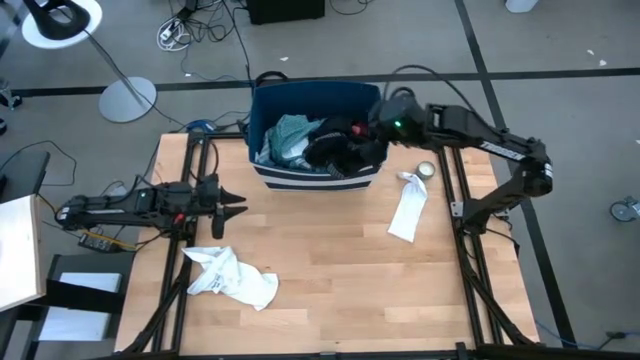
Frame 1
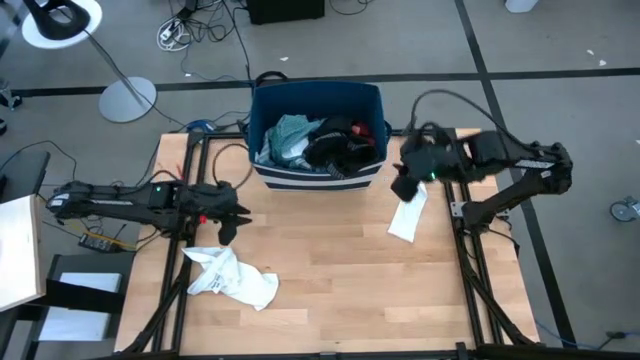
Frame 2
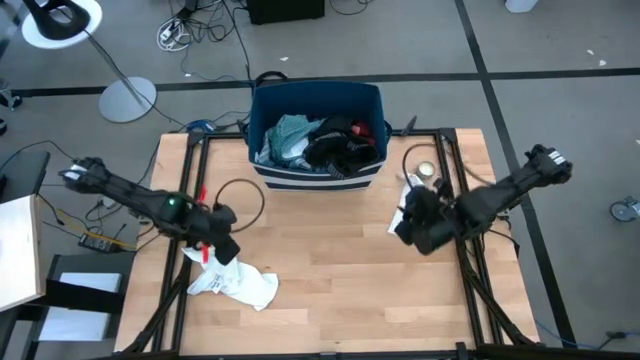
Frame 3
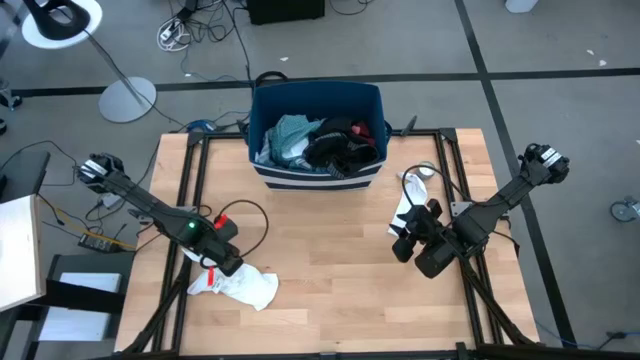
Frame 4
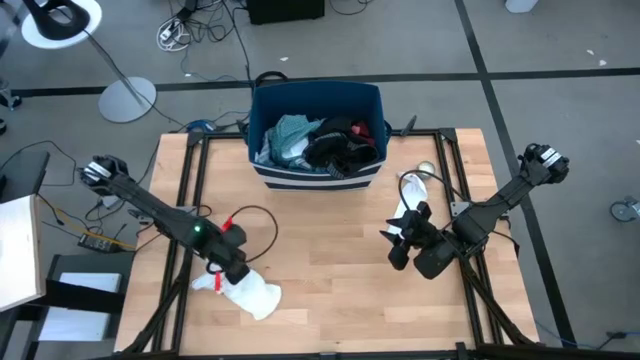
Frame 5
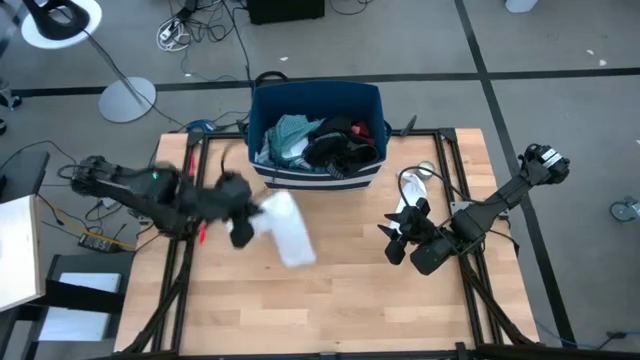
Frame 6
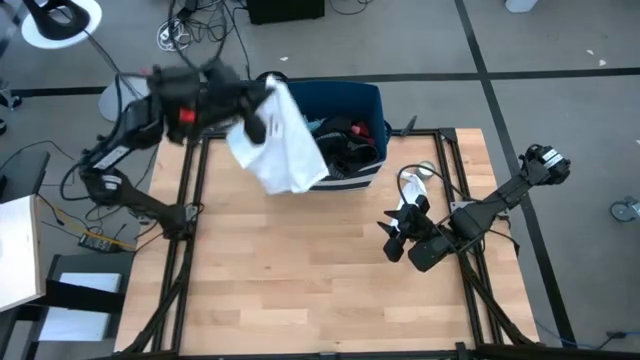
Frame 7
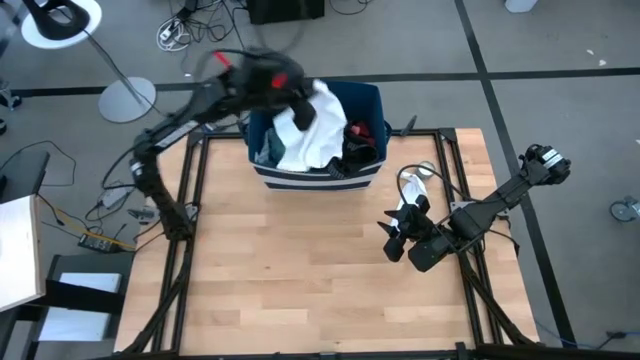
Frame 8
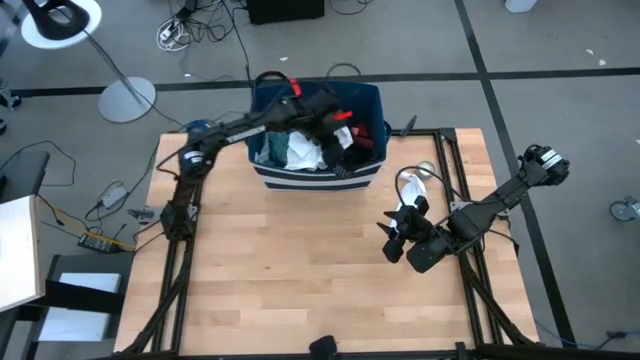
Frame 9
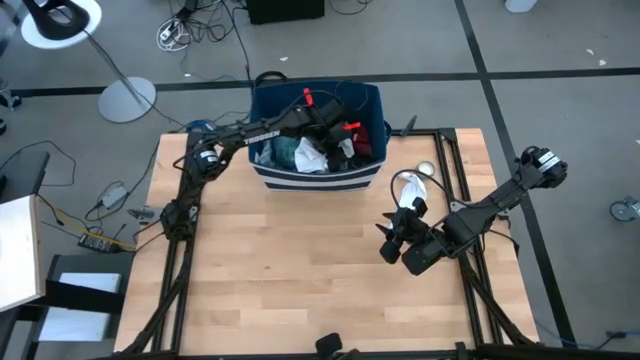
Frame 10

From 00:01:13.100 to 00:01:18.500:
Task: Sort clothes
Put the white shorts into the blue laundry bin

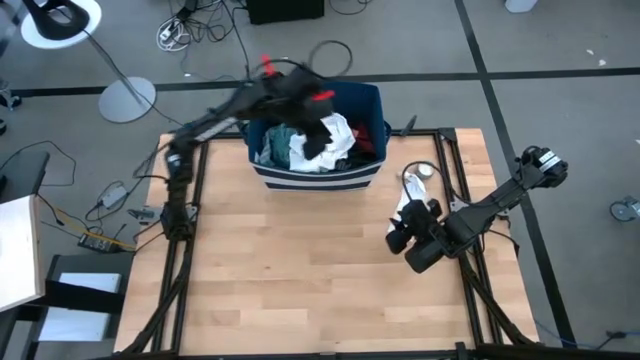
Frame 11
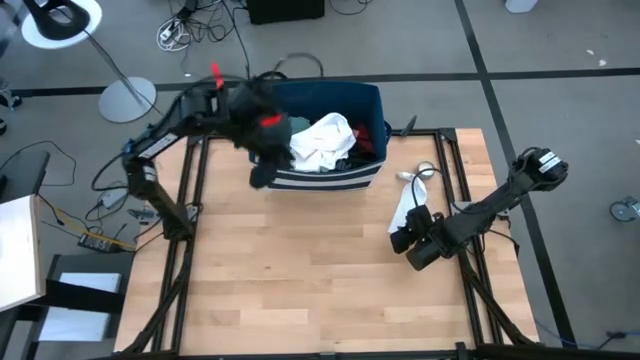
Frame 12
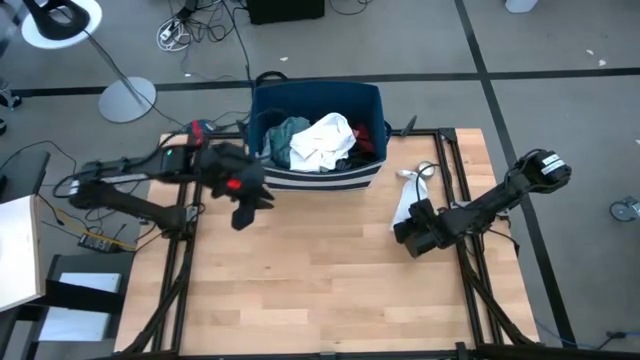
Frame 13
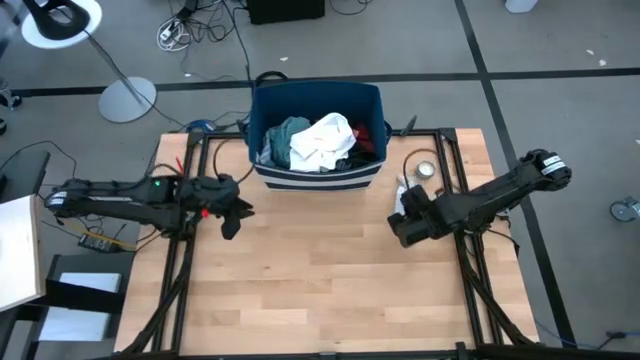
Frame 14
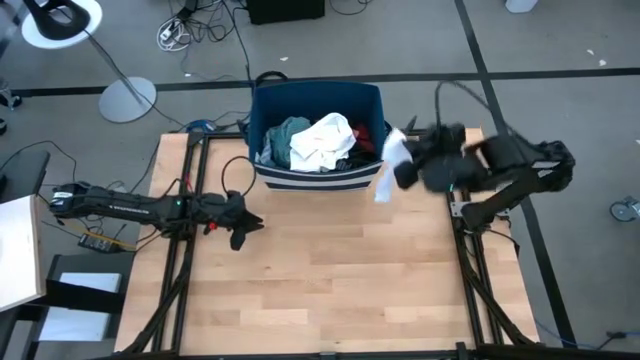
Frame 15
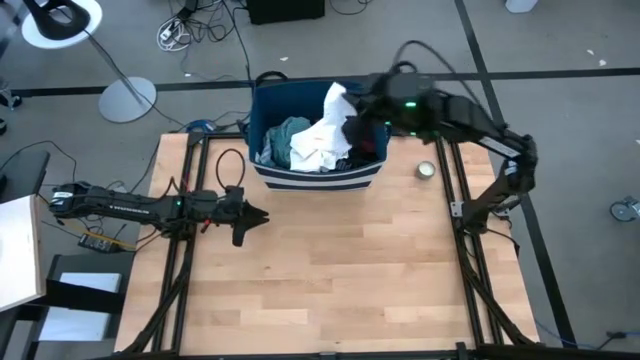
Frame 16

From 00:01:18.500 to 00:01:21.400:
Put the white sock into the blue laundry bin

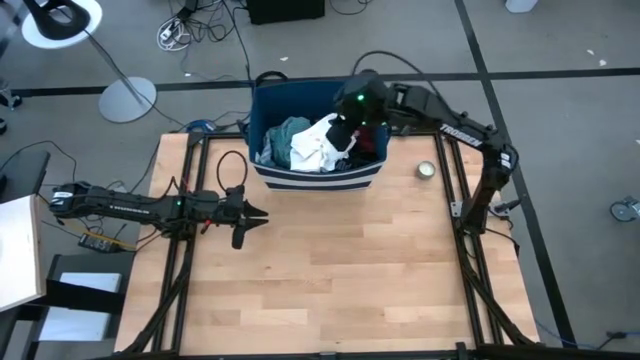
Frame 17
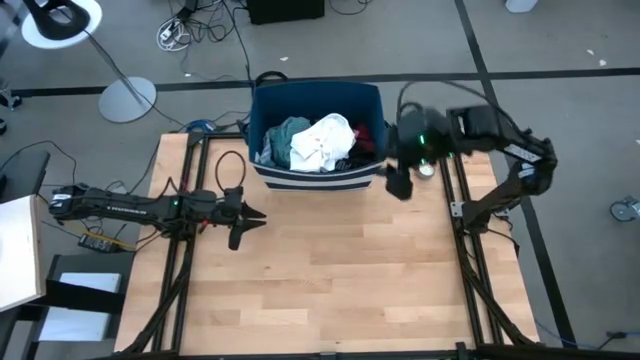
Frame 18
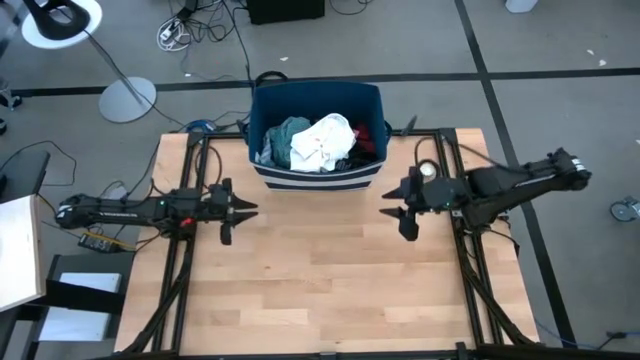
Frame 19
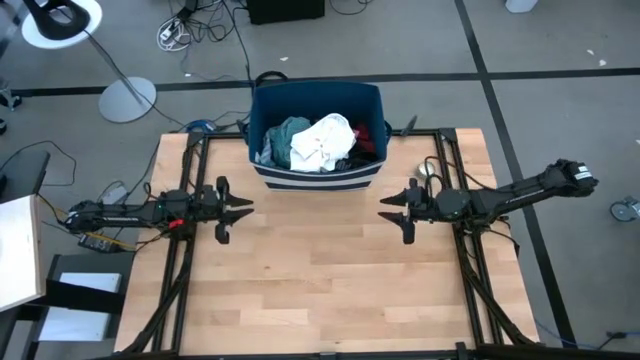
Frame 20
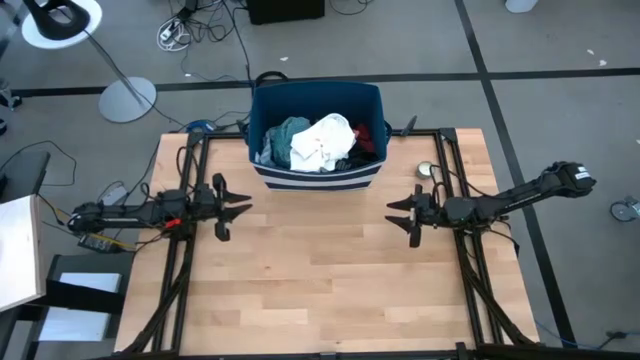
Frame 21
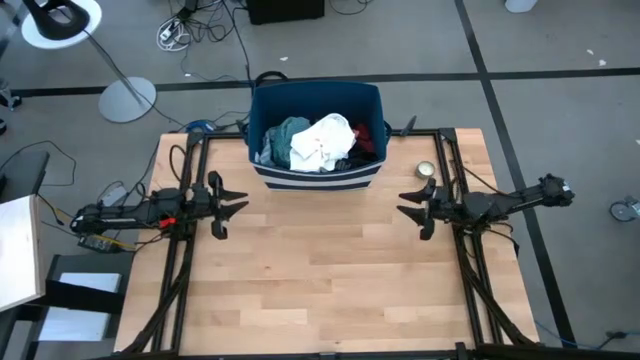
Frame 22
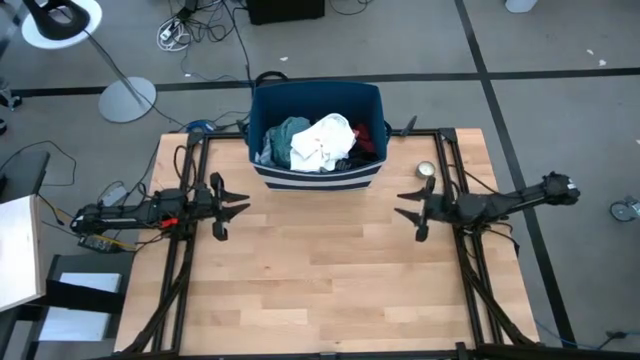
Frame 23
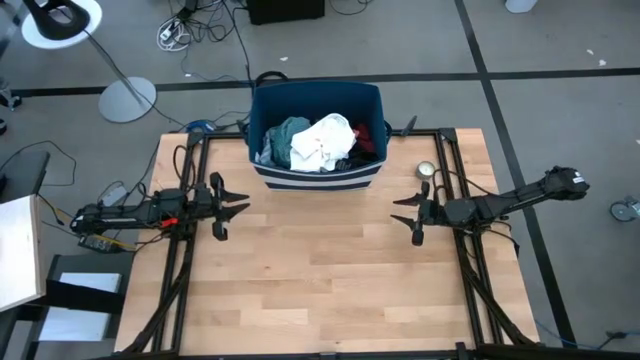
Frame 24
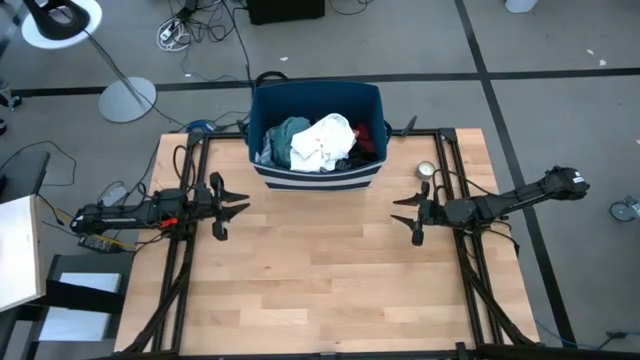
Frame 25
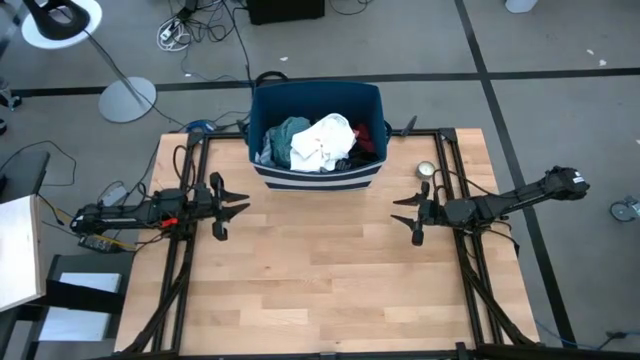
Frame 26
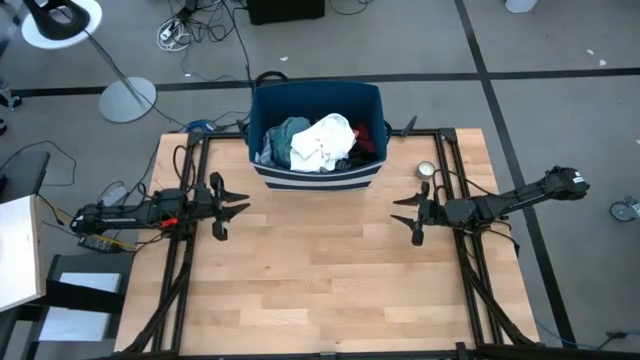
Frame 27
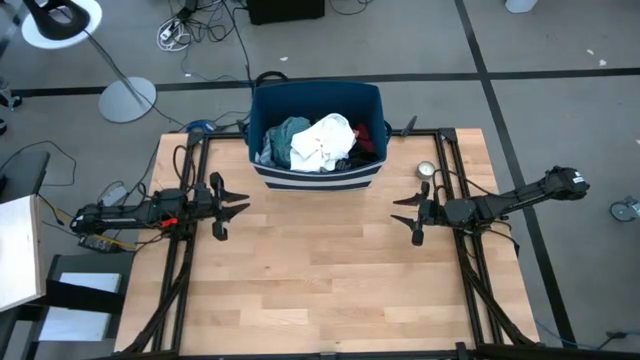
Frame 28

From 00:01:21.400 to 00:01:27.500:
Return to Home Position

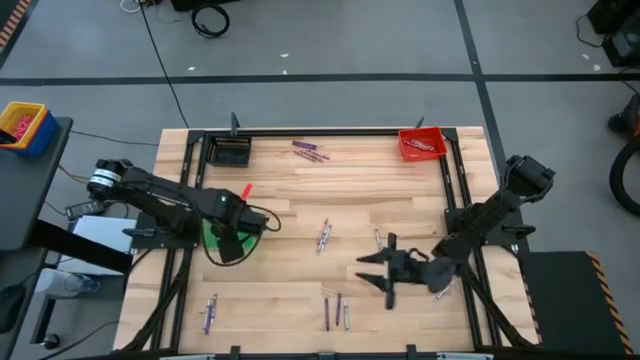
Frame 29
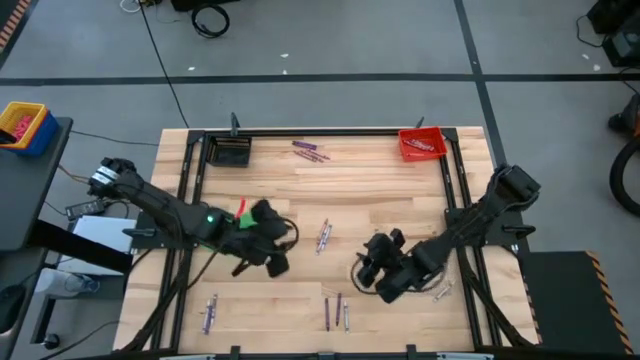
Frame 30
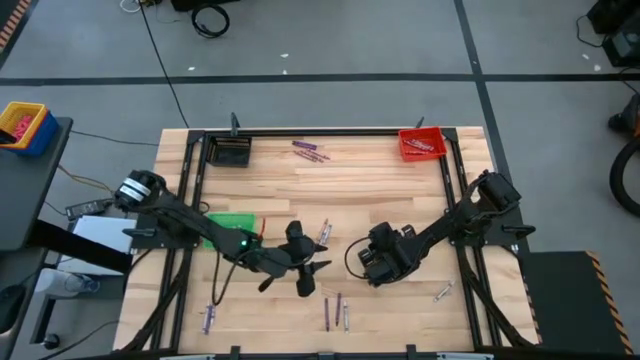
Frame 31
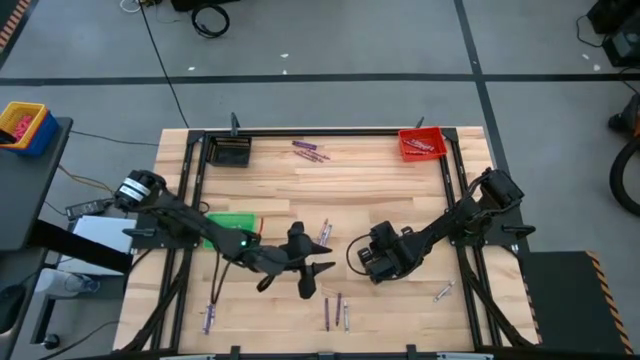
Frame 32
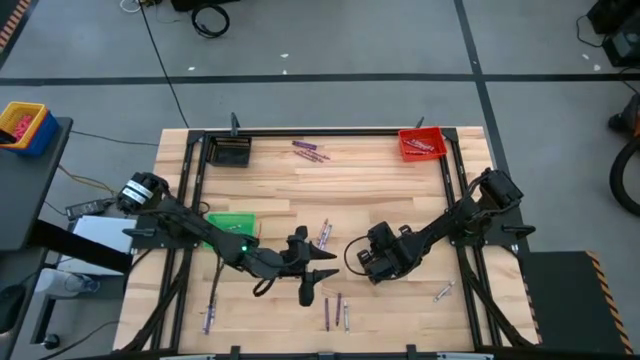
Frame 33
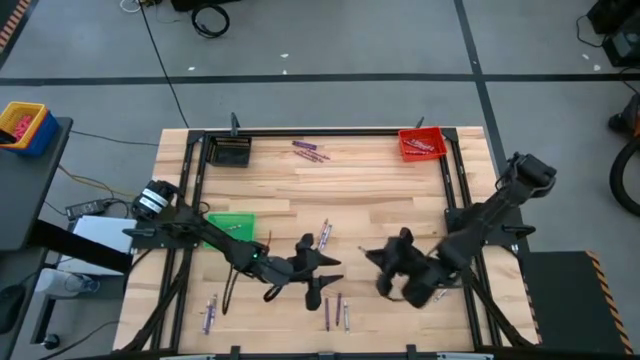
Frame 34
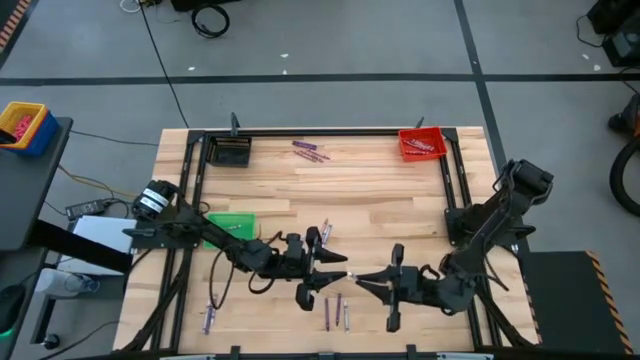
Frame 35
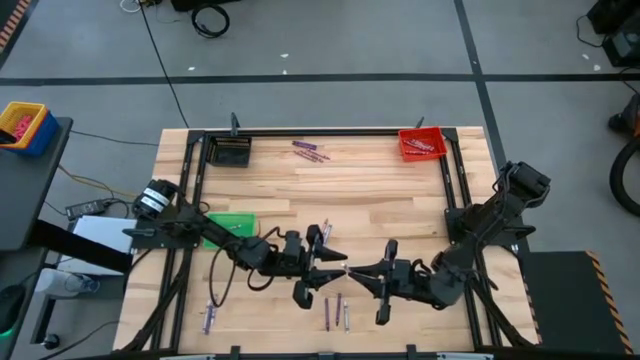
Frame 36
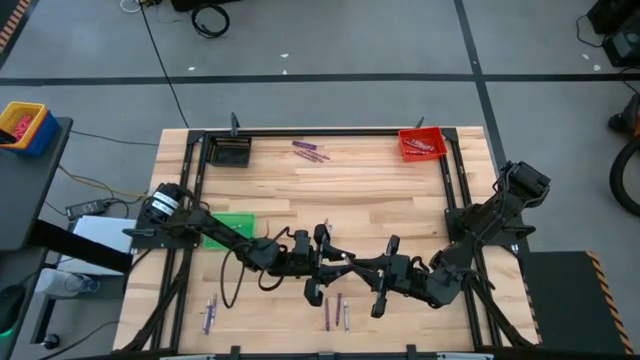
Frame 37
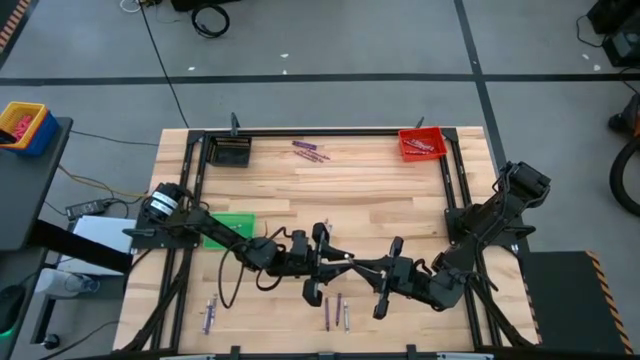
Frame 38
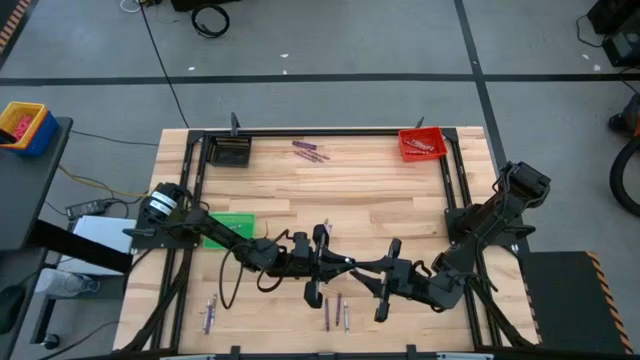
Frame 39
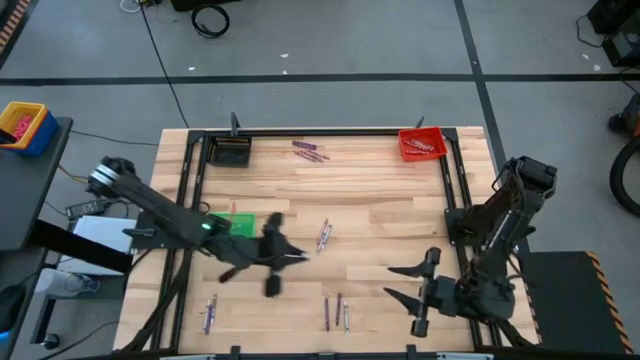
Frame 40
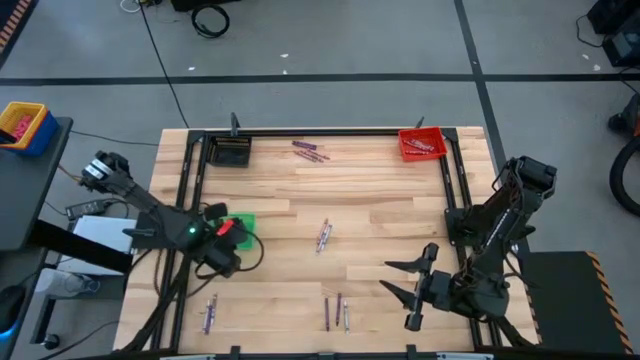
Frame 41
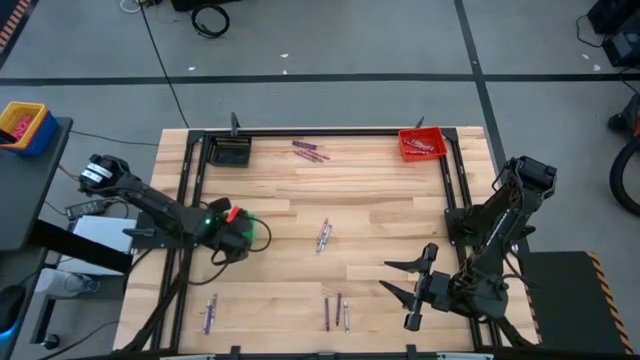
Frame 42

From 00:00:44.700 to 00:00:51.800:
Task: Sort crayons
Put the white crayon into the green bin

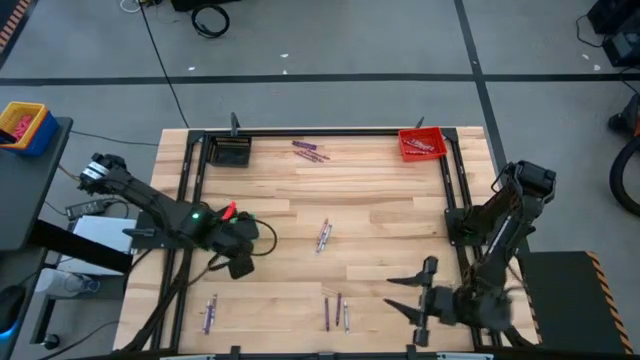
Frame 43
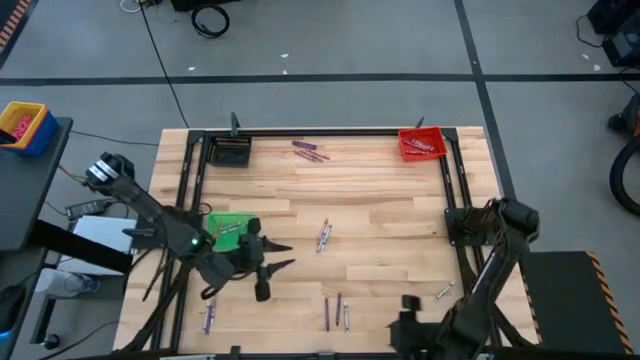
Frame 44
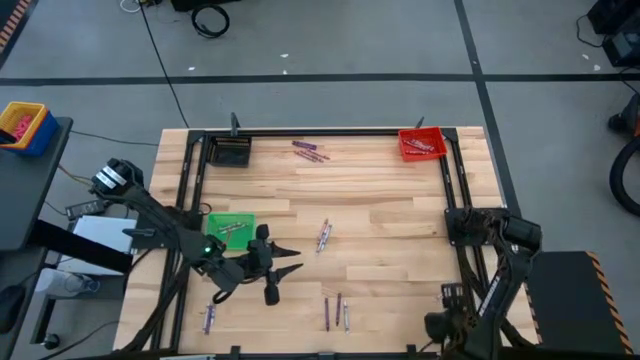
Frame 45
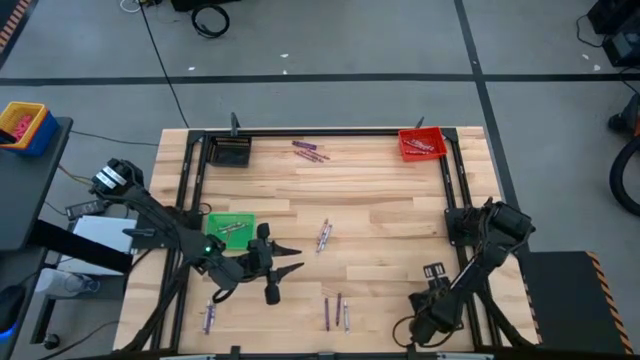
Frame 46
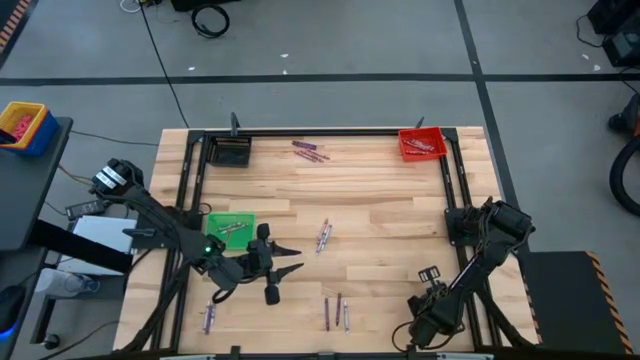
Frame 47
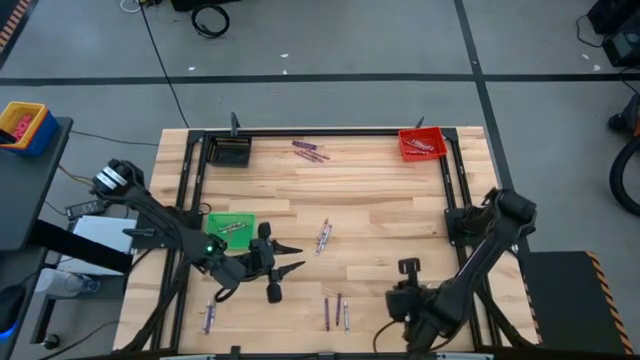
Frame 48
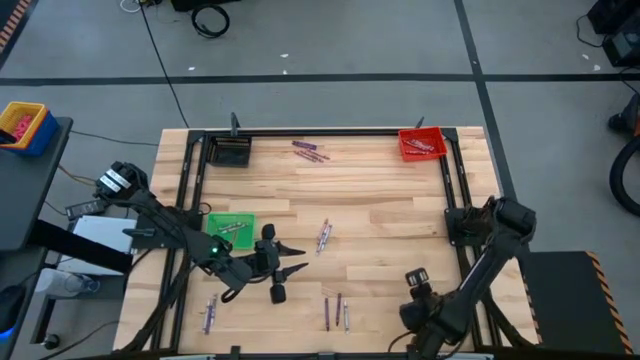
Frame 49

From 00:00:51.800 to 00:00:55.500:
Put the white crayon into the green bin
